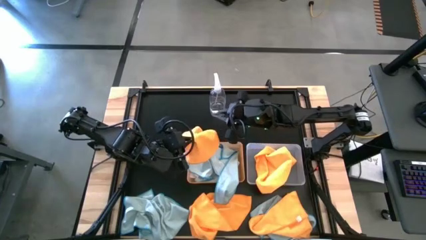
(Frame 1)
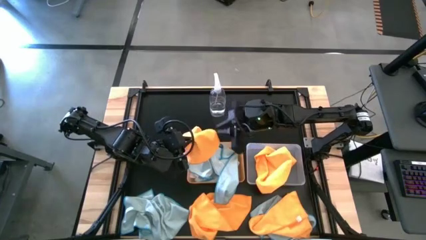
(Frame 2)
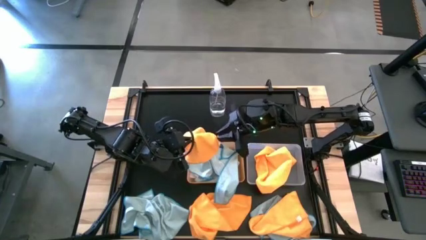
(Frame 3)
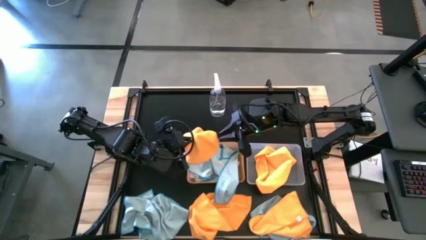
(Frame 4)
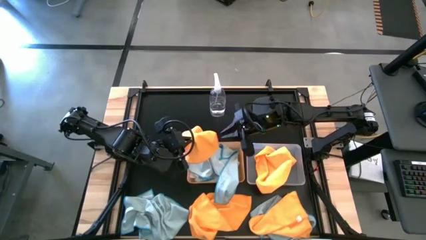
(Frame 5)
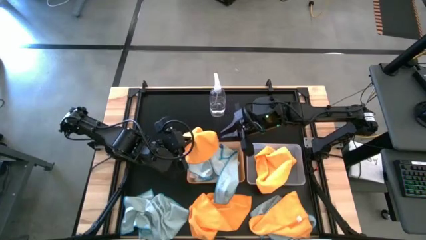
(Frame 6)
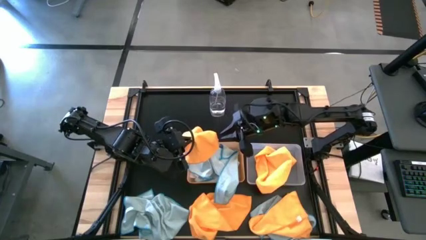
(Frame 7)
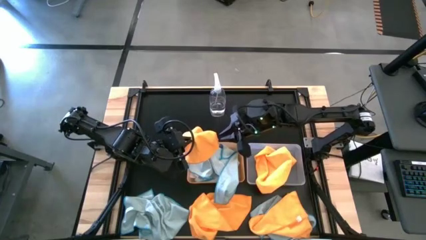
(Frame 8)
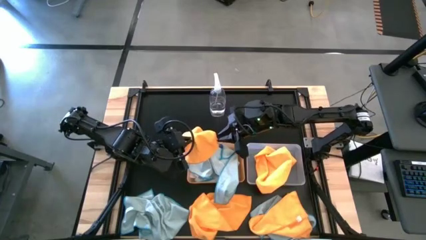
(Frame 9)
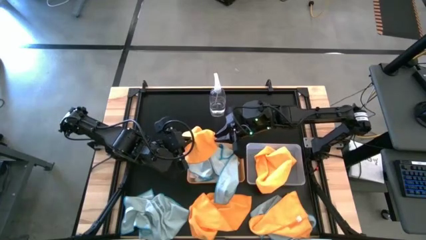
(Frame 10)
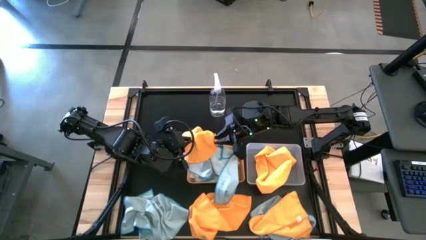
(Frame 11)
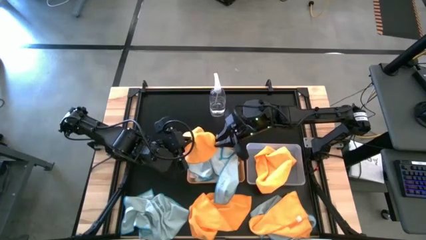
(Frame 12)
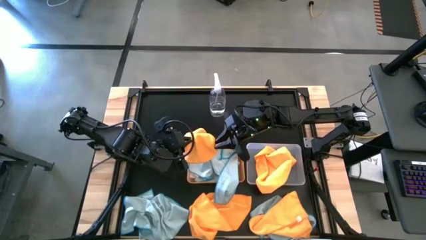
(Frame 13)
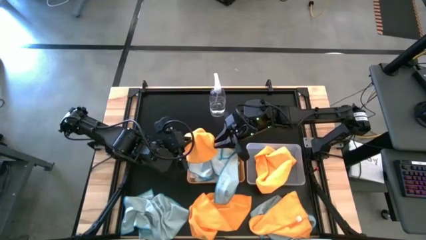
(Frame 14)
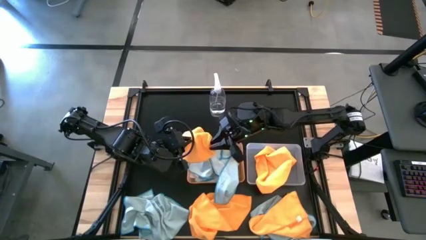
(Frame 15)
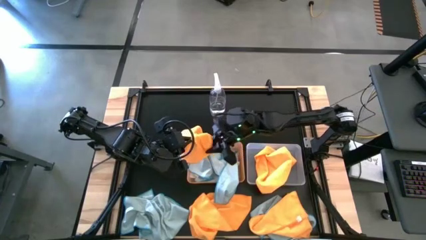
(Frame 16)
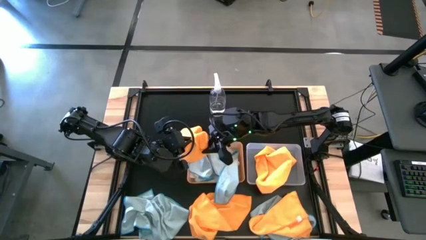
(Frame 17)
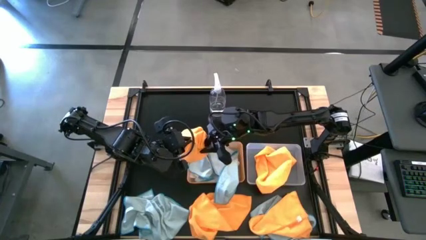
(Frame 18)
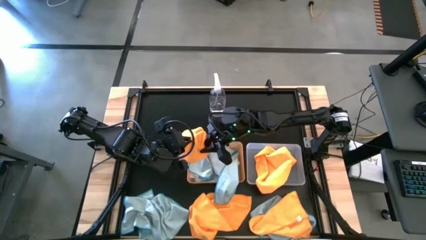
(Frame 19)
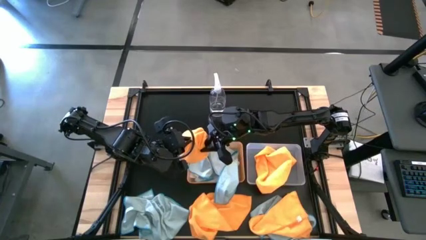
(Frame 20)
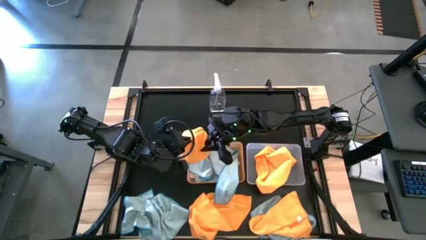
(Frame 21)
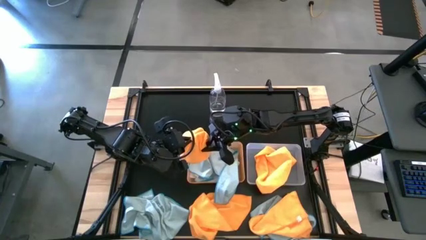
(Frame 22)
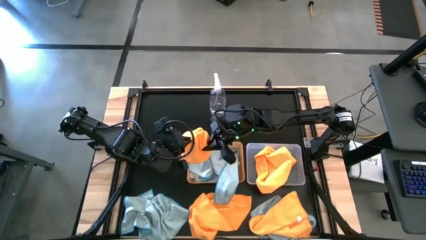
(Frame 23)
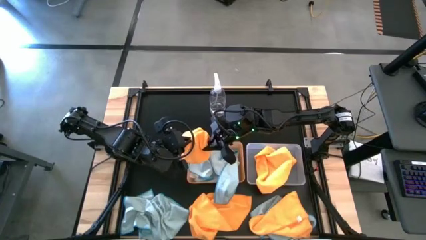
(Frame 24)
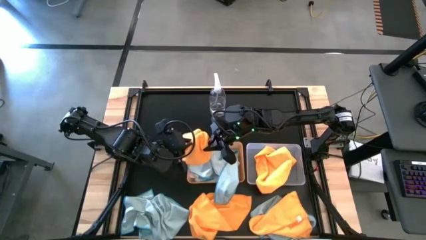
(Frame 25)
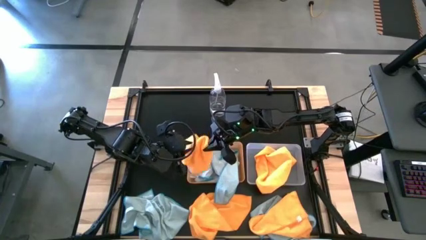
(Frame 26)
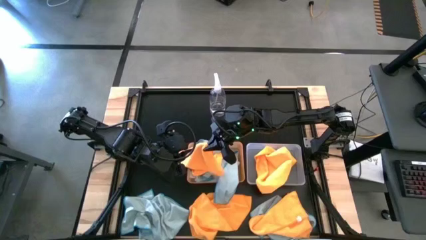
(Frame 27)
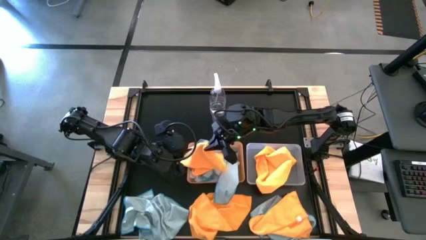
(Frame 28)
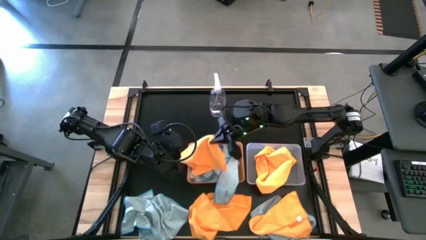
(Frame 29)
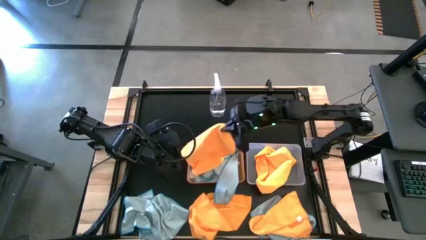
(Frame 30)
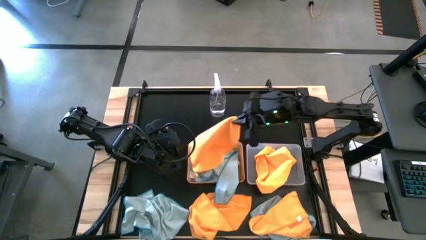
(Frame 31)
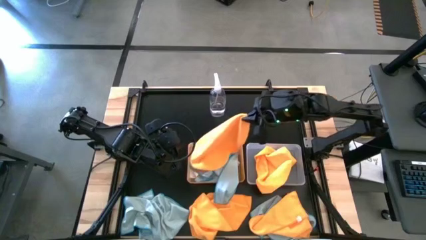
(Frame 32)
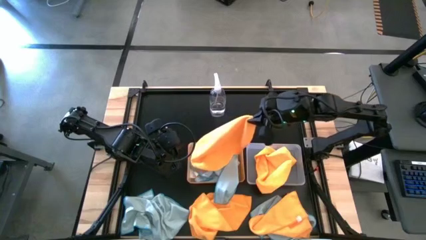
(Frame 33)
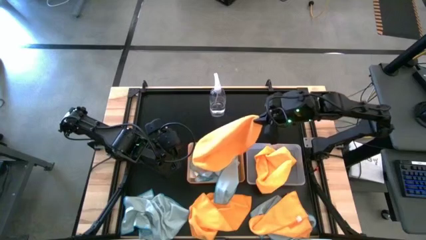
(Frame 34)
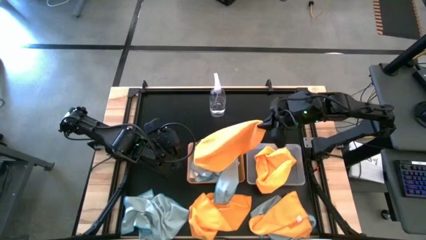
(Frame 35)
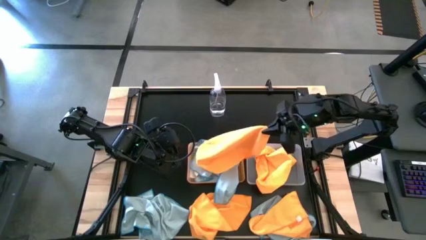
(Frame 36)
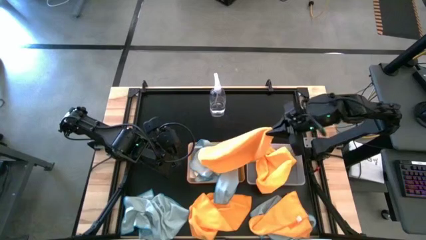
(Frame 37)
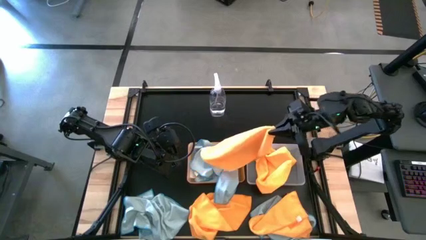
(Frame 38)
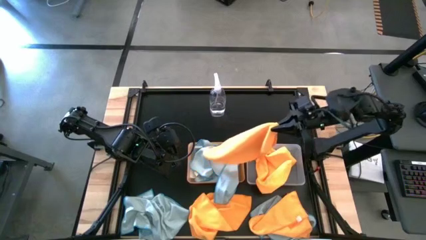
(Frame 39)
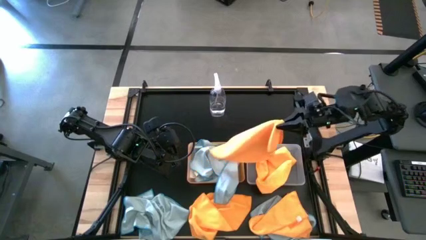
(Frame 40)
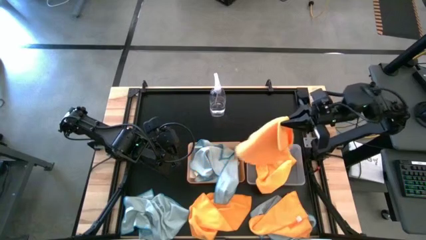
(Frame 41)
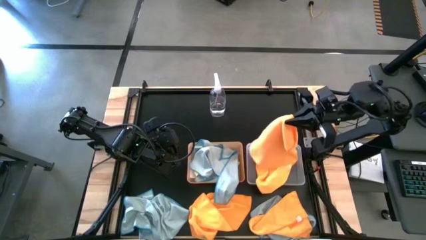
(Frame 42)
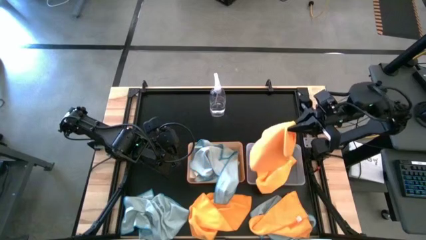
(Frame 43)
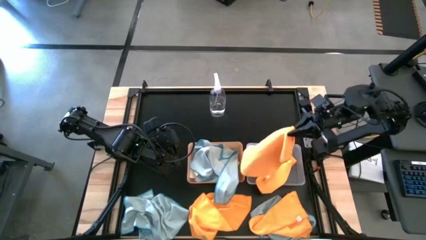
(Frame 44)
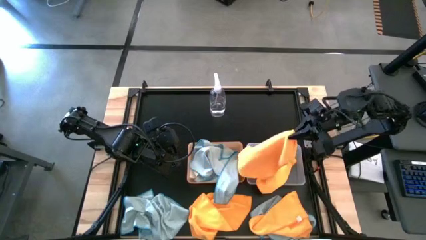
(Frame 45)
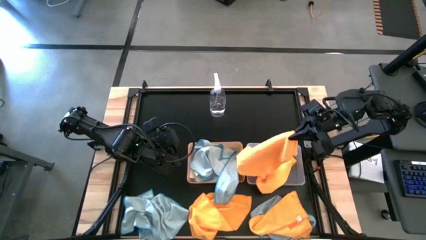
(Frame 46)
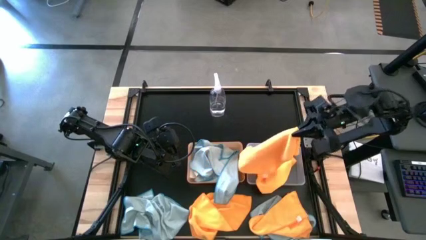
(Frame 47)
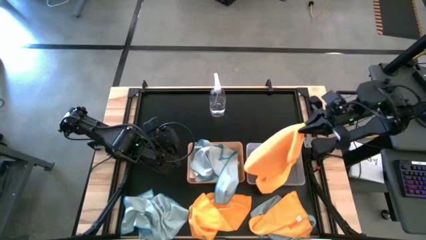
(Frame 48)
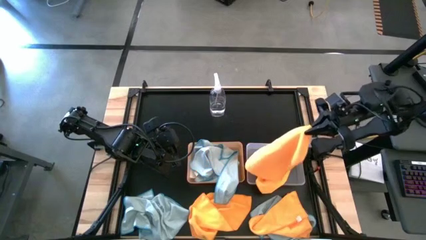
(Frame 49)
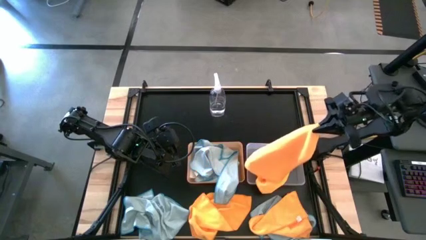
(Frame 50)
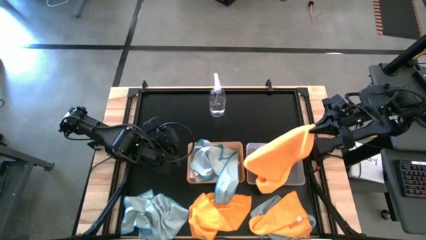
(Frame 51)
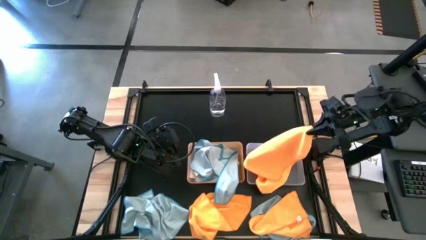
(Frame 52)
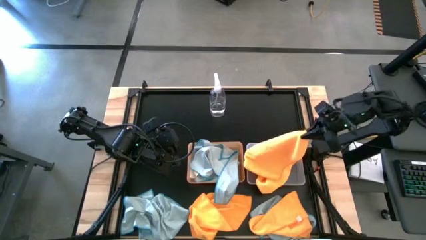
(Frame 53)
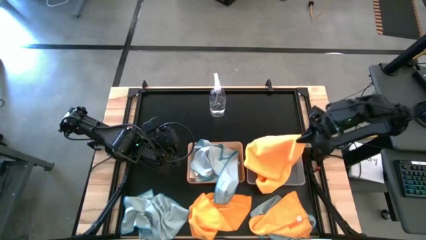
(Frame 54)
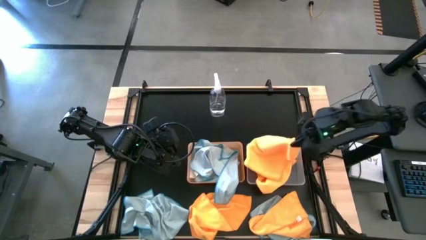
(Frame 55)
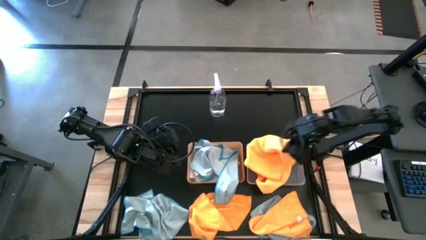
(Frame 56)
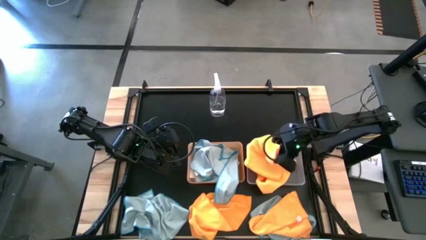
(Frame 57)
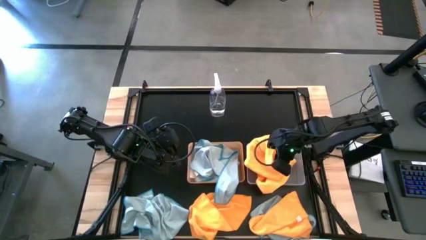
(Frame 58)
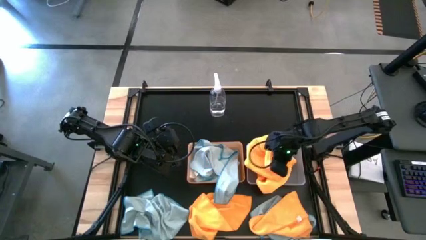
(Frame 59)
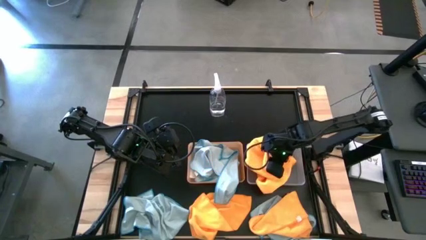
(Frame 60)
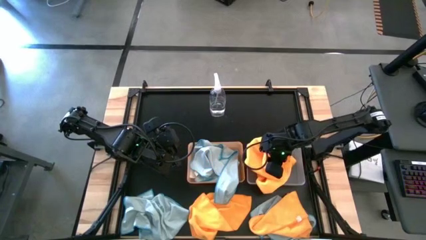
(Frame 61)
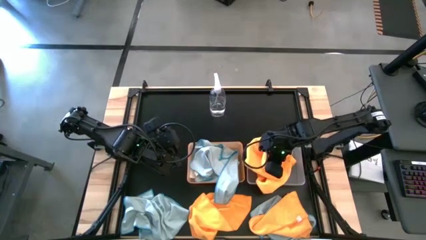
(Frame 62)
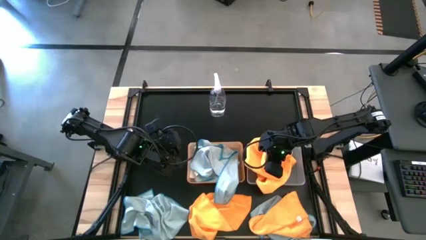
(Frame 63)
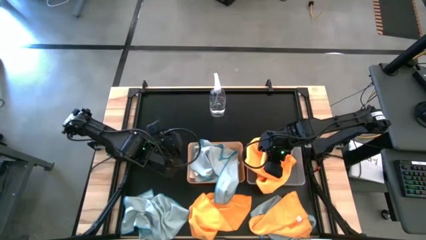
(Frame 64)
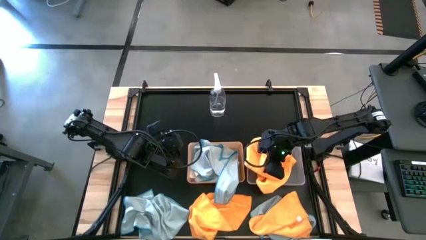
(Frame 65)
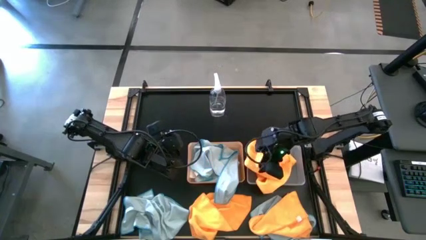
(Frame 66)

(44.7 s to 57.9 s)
Task: Sort microfiber towel by color & place in baskets
Put the orange towel into the transparent bin
